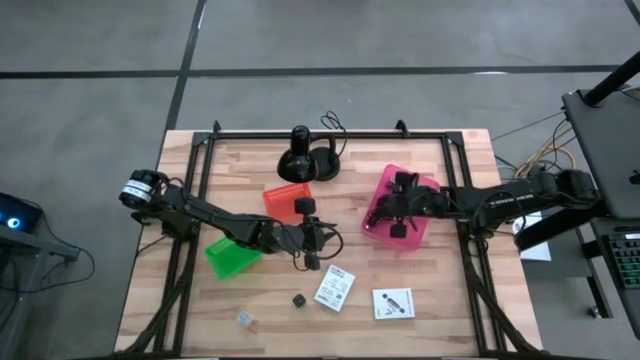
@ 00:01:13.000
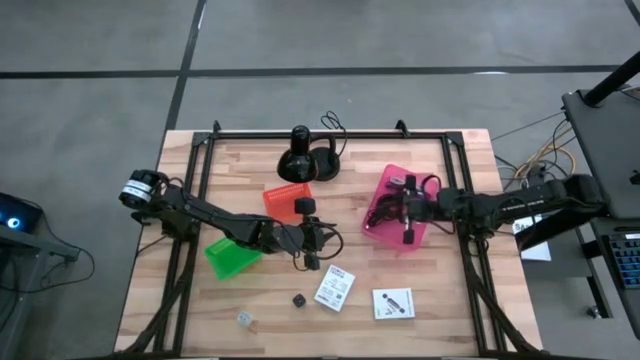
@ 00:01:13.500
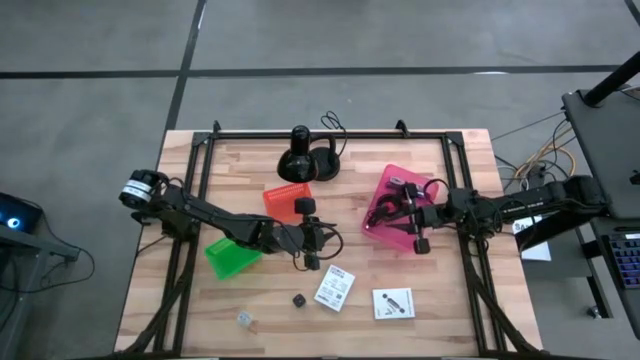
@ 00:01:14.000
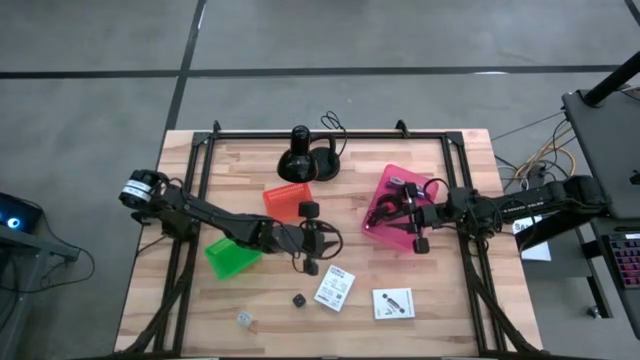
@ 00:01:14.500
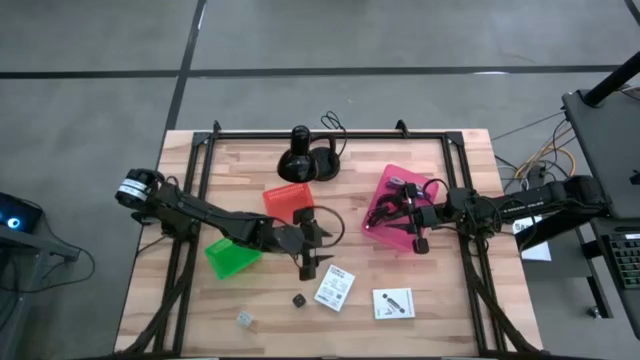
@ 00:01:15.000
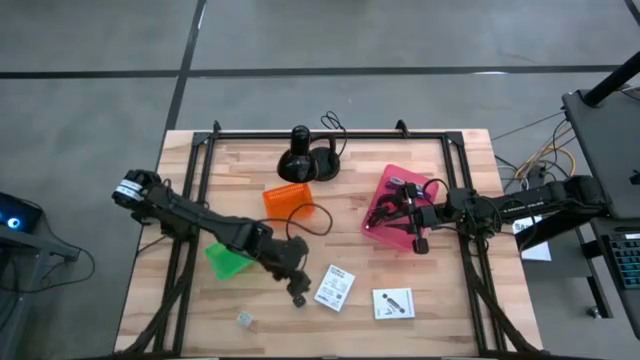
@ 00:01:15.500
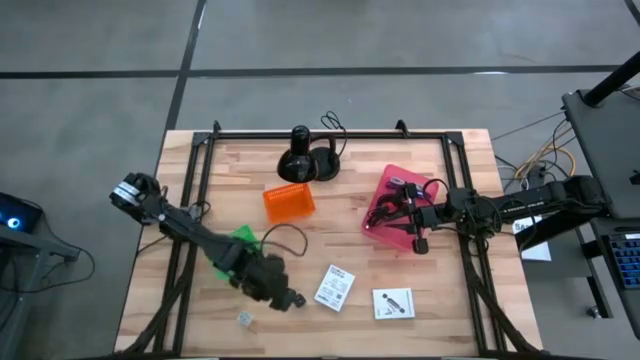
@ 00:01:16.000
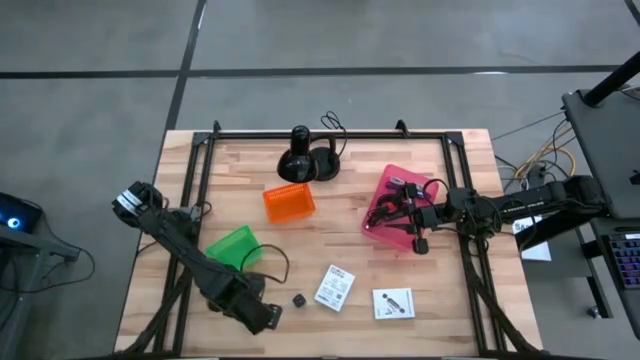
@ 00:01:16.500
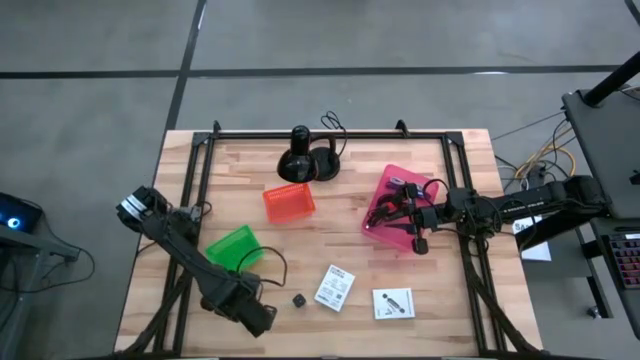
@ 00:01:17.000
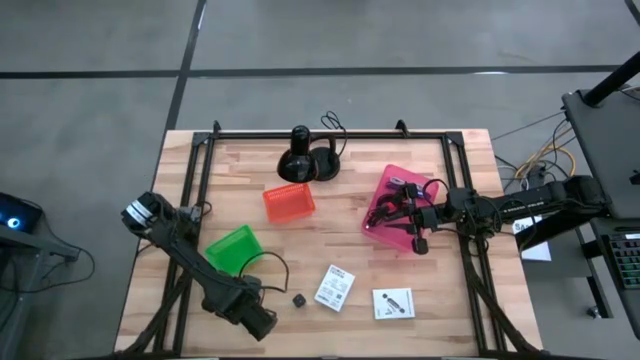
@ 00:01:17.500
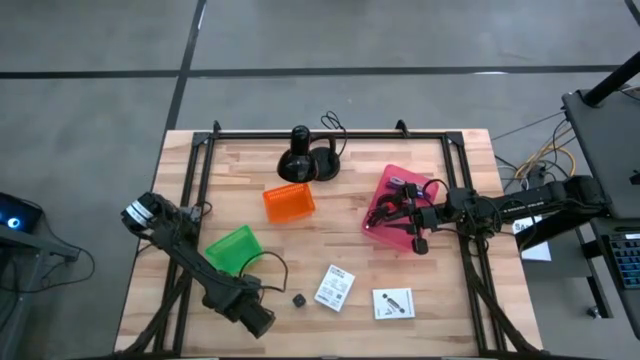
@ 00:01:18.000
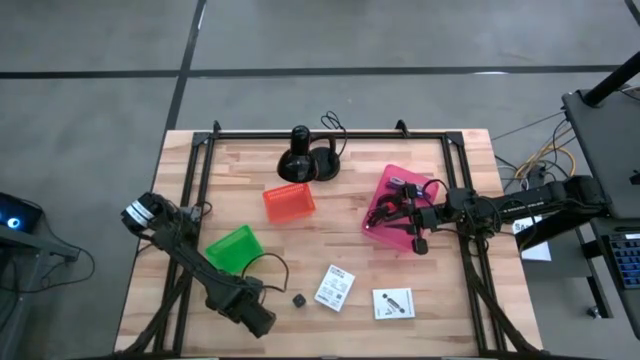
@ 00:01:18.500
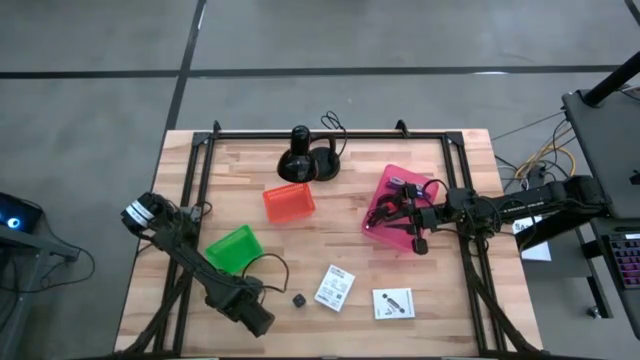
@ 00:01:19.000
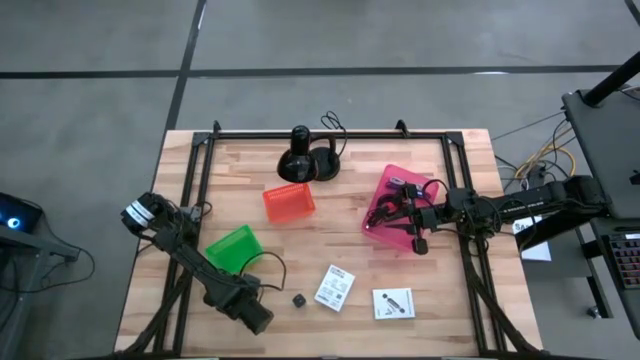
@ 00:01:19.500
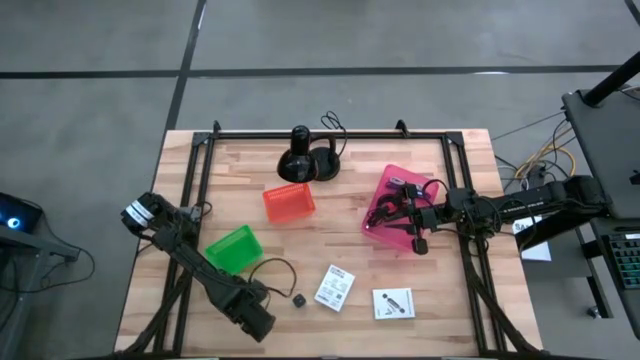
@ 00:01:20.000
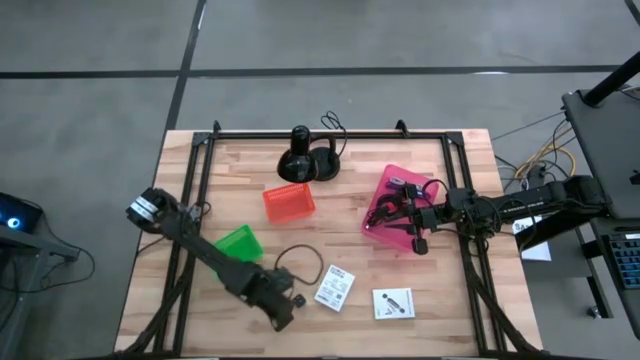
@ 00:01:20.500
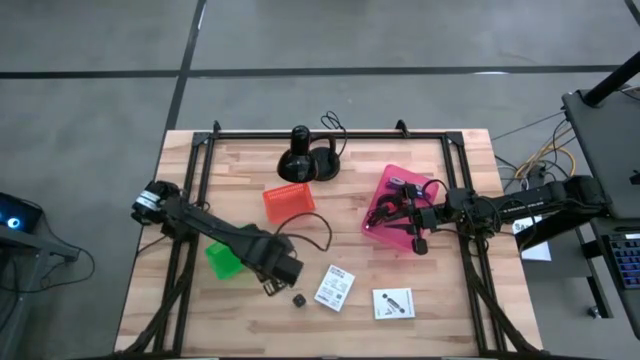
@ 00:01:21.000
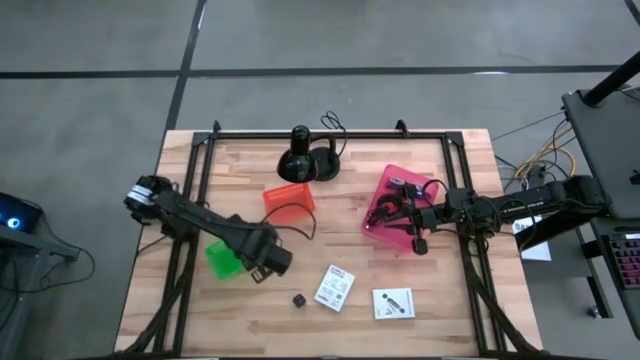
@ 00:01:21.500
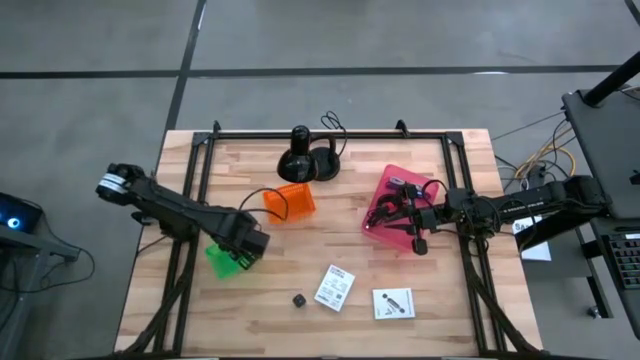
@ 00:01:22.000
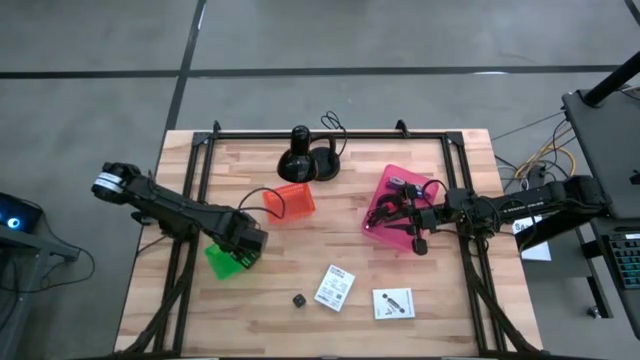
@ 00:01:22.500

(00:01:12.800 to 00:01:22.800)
Task: Pick and place items into bin
Put the white charger adapter into the green bin

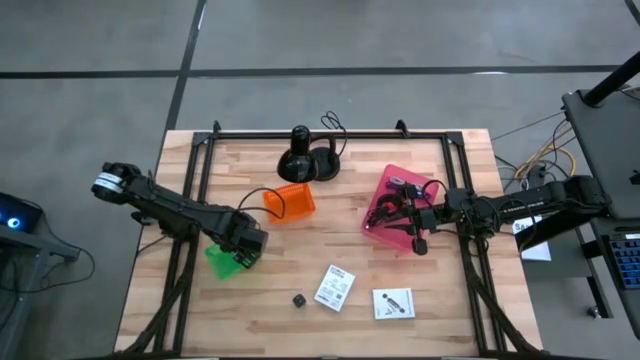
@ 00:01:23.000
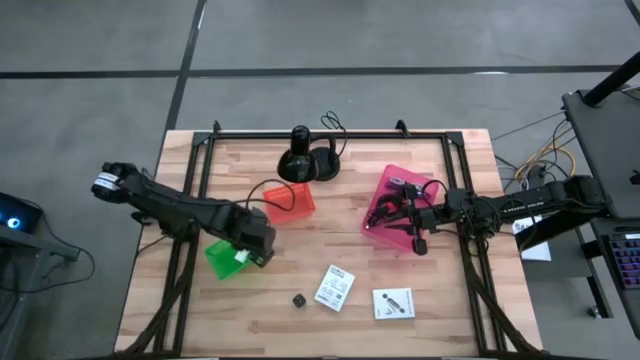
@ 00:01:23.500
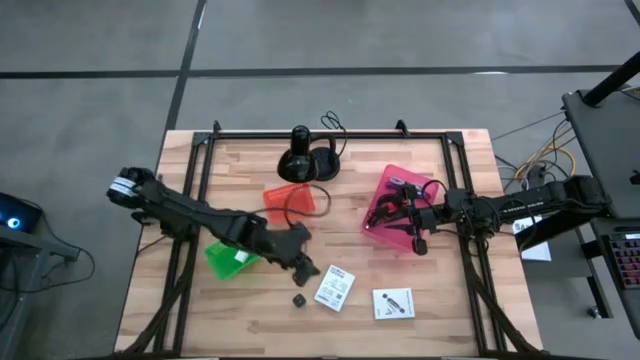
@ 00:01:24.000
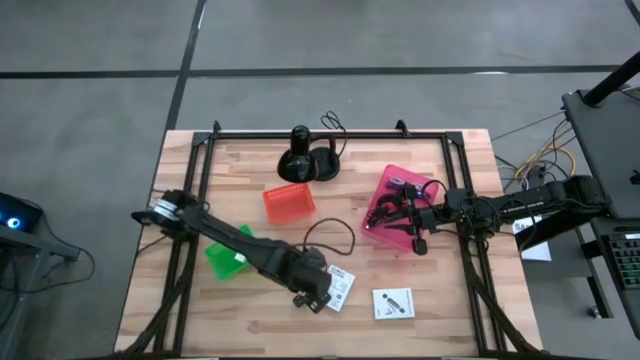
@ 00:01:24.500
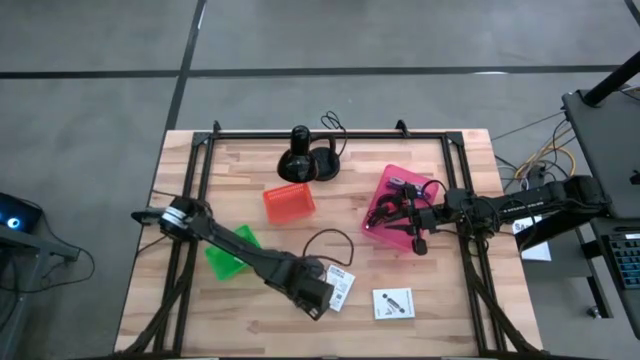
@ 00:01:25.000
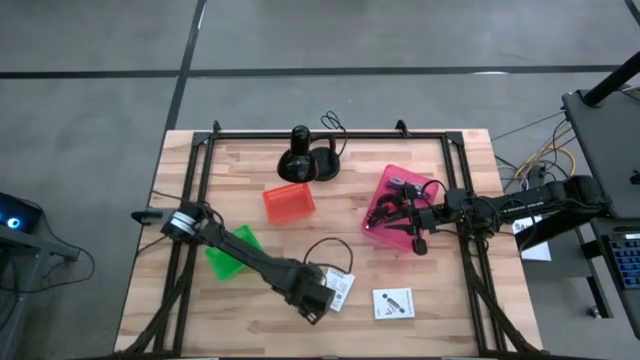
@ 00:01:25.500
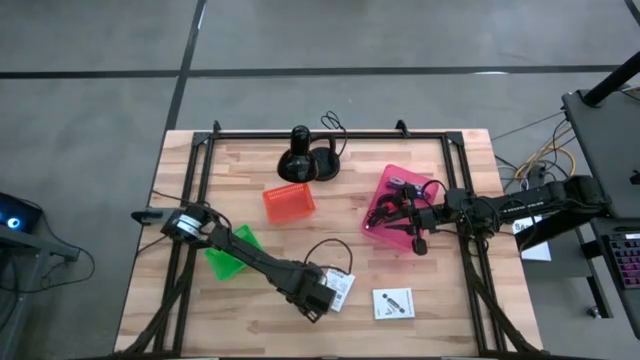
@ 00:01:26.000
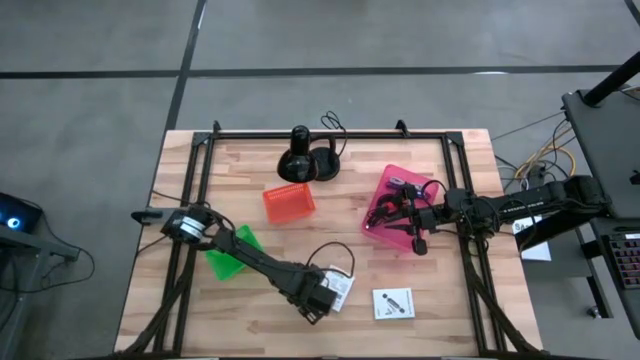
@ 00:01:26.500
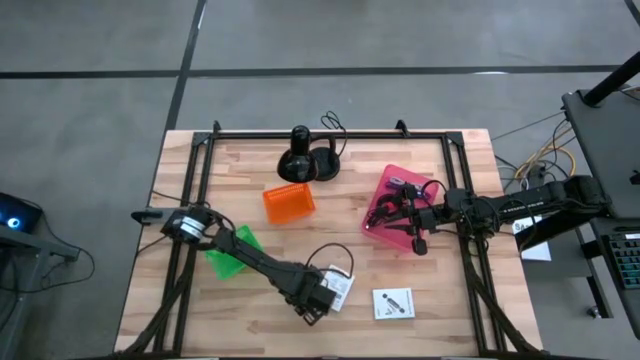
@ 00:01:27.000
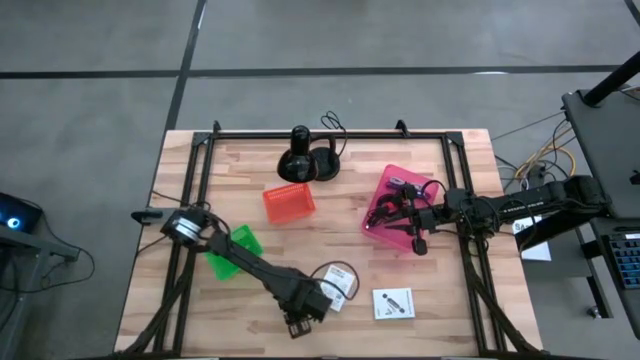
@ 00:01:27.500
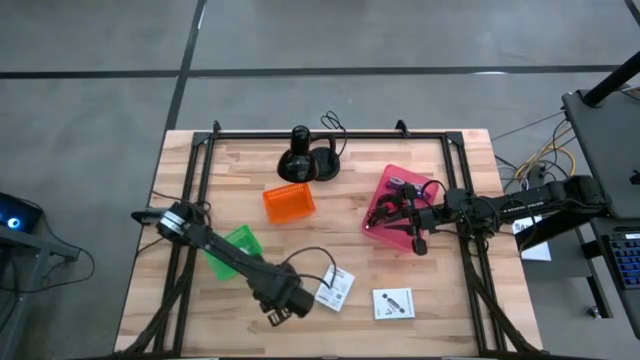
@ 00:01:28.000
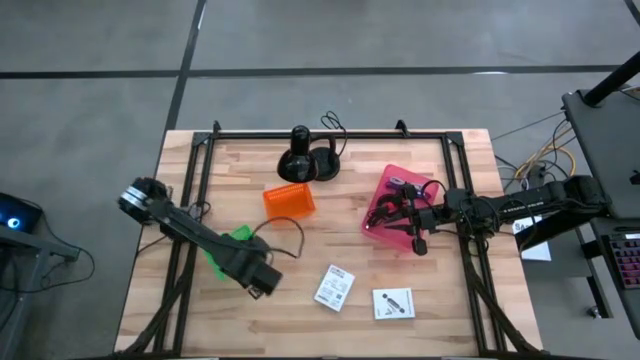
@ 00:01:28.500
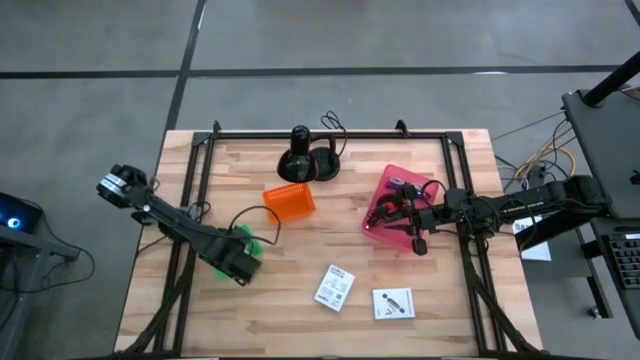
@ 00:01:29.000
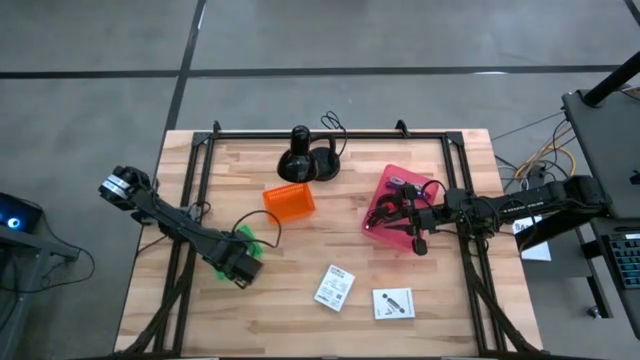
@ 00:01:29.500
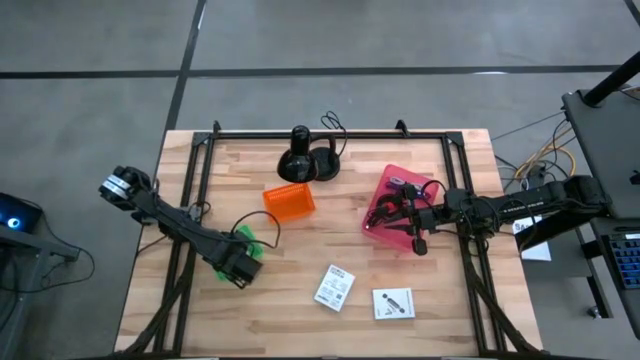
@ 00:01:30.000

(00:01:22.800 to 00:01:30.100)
Put the black charger adapter into the green bin
